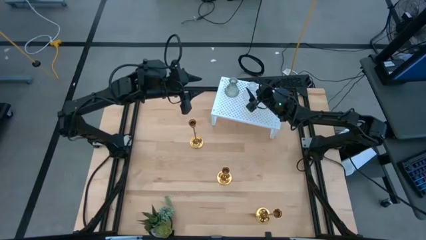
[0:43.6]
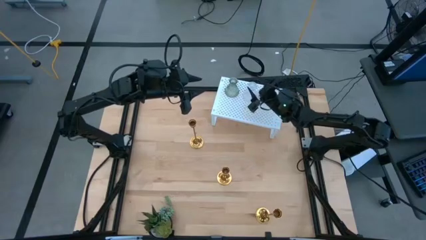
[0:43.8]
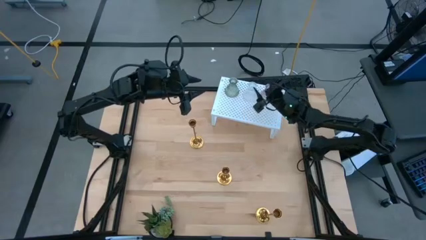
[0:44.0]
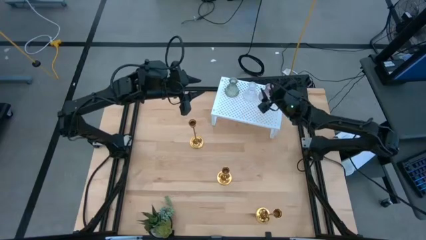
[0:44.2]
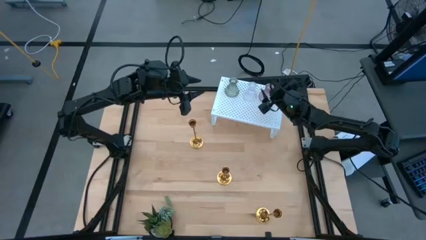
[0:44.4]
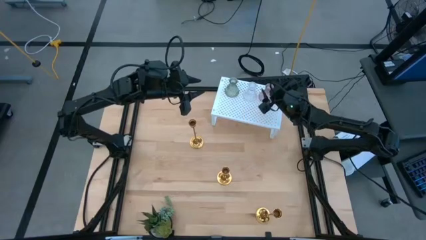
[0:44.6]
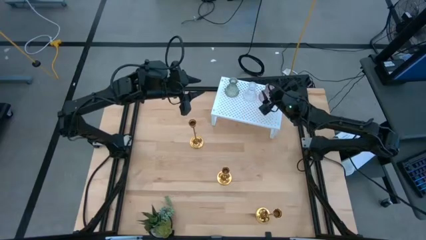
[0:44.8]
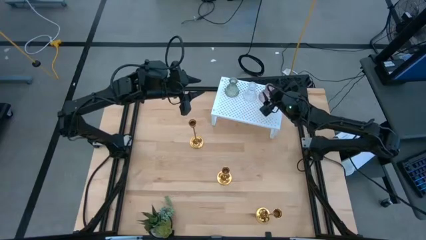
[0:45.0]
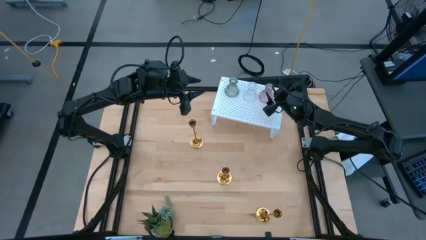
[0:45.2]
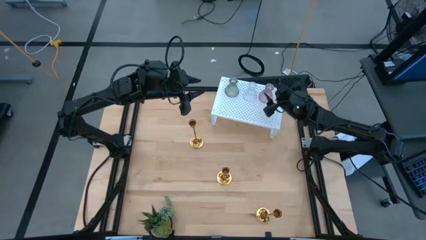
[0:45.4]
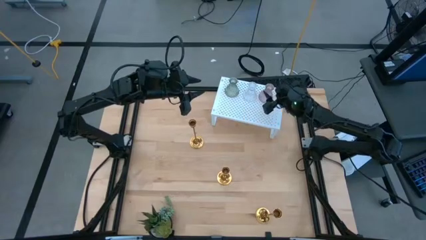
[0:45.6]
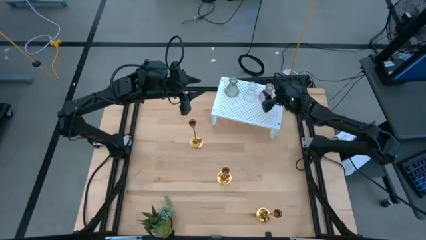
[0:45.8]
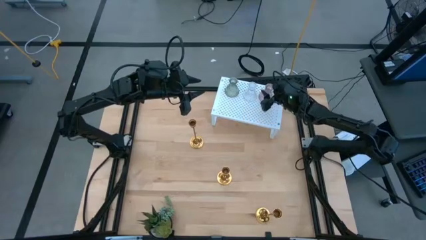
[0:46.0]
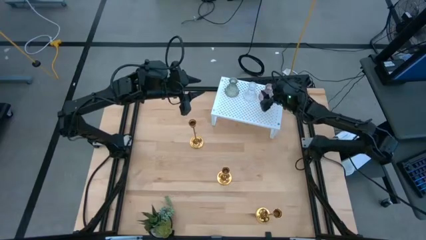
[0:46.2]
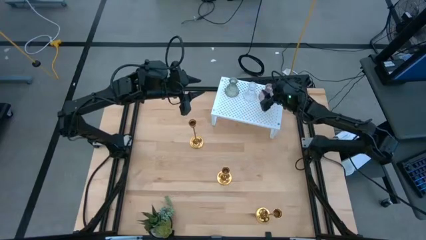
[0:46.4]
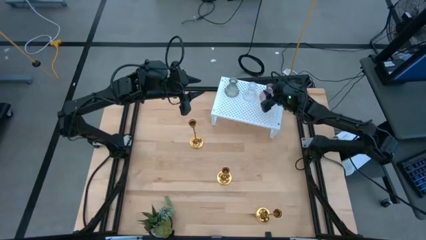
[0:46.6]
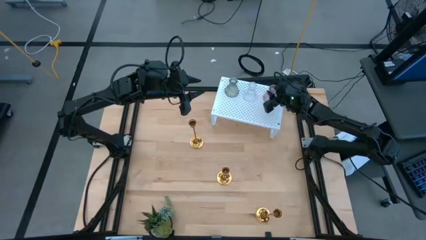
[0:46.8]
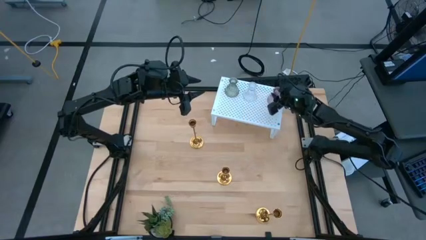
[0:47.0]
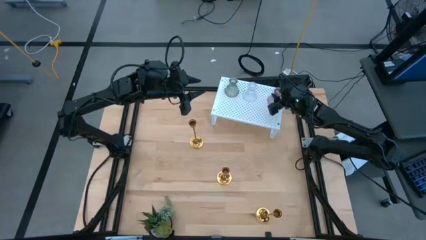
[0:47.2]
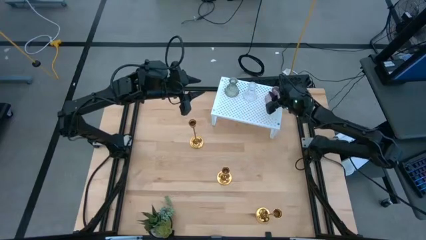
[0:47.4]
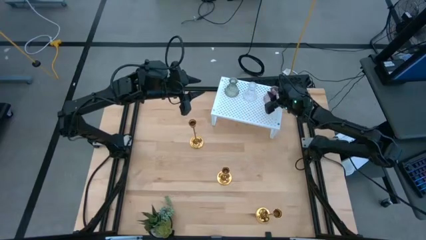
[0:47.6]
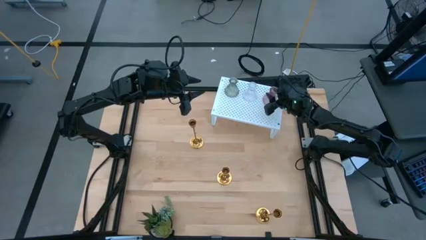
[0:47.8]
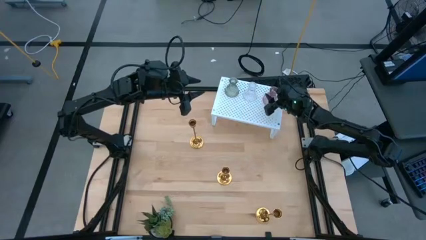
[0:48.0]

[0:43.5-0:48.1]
Task: Pick & Place candle stick holders
Adjust the pink glass candle holder on the shelf

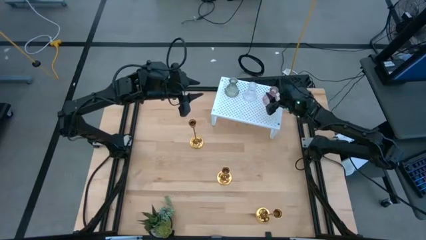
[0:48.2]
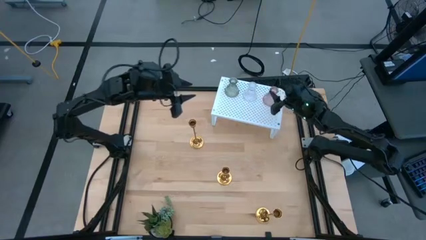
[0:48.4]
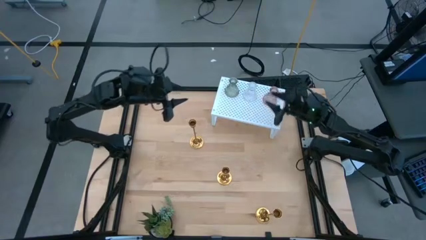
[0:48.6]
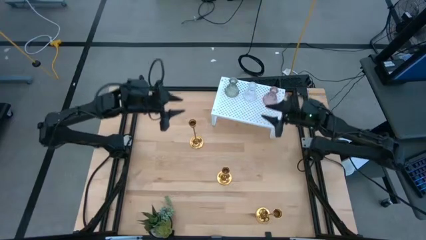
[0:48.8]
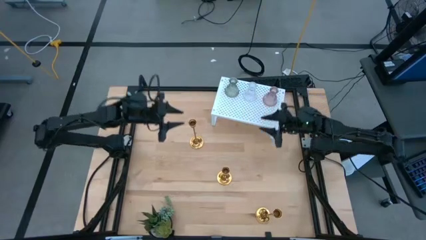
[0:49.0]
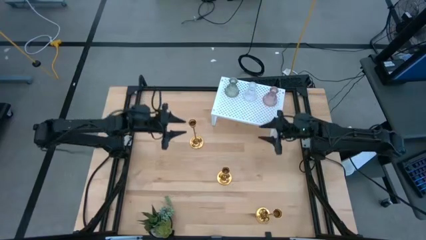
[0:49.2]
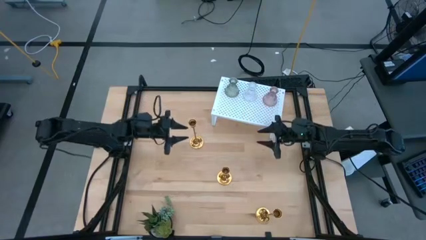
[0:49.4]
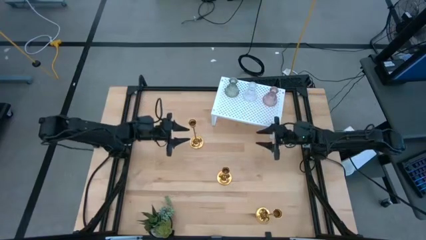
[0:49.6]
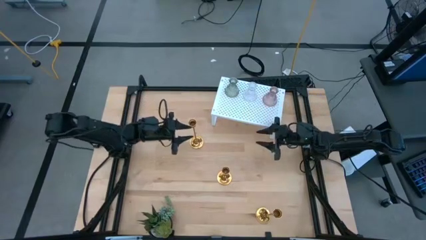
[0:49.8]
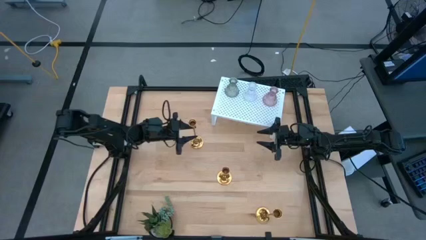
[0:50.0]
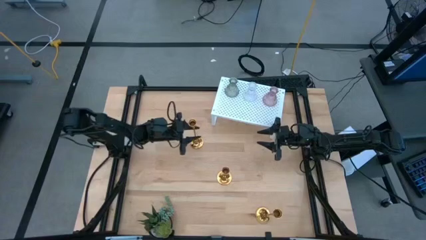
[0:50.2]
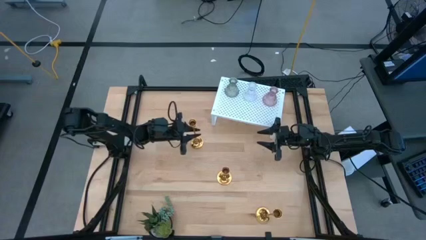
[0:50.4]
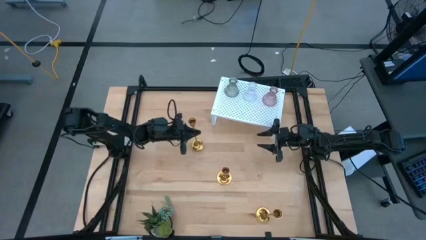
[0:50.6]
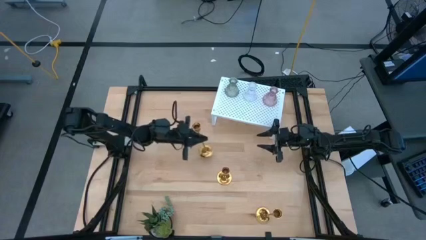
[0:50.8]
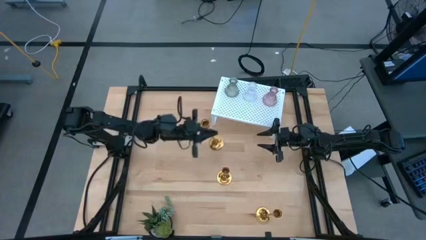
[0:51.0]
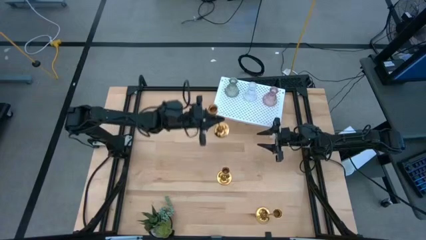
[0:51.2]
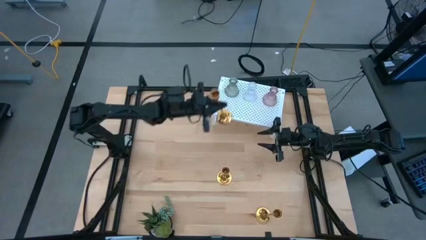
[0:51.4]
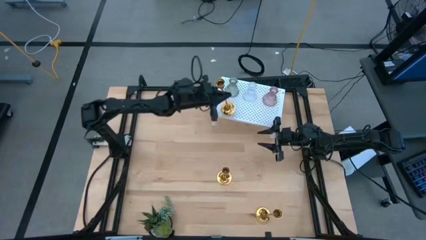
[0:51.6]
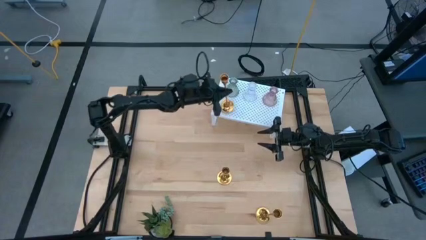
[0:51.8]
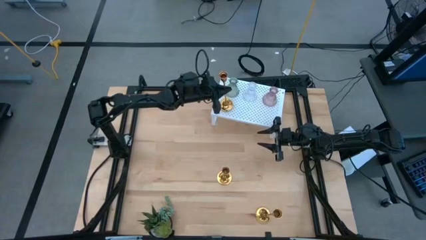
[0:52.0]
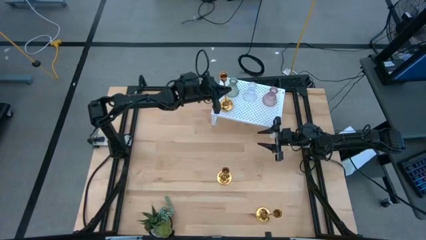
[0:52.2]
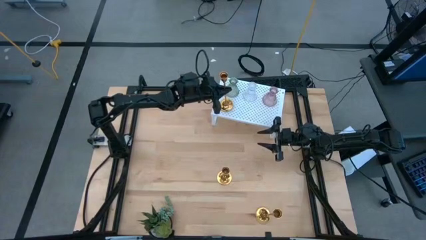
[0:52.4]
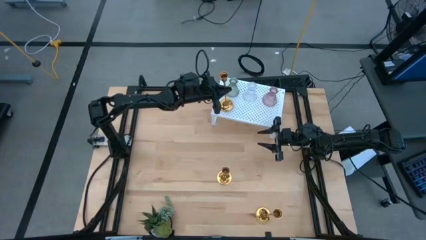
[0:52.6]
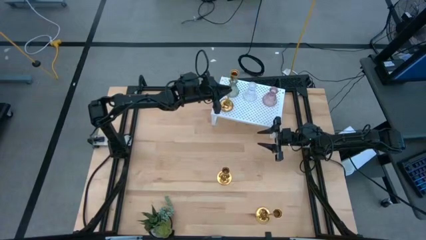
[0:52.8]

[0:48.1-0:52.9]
Put the gold candle holder on the shelf

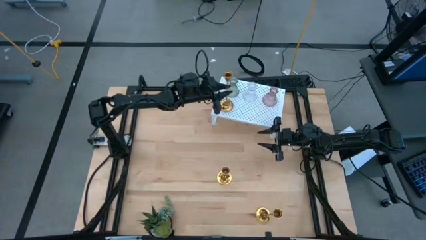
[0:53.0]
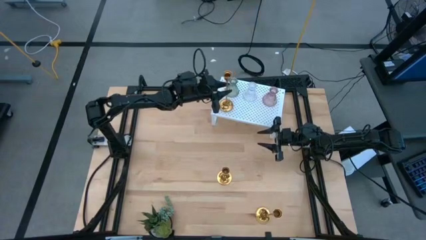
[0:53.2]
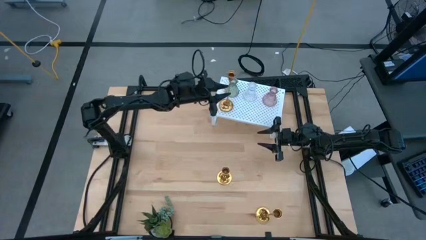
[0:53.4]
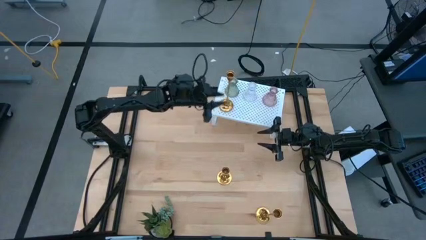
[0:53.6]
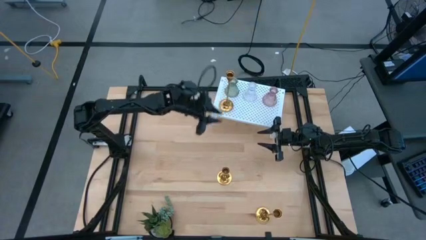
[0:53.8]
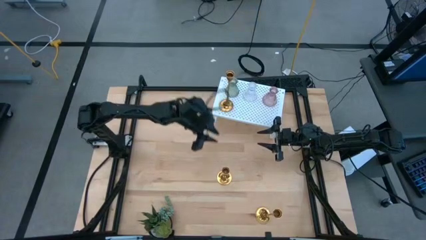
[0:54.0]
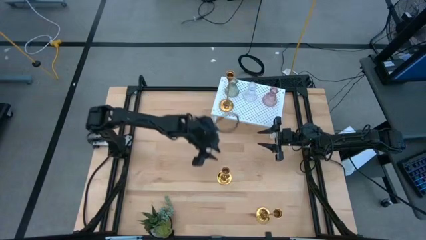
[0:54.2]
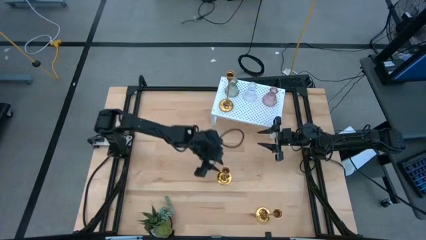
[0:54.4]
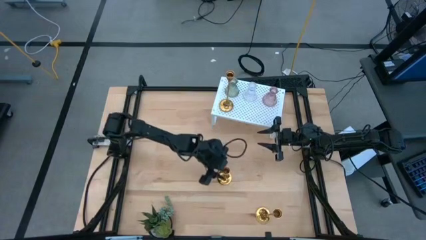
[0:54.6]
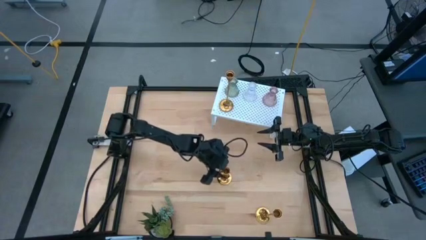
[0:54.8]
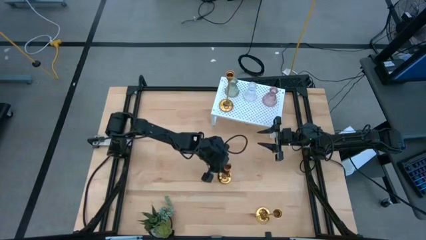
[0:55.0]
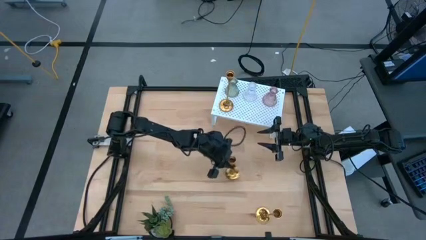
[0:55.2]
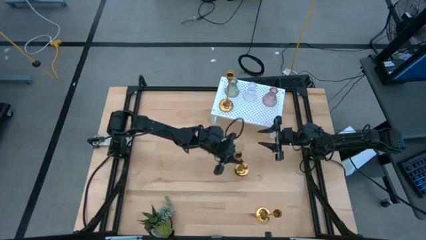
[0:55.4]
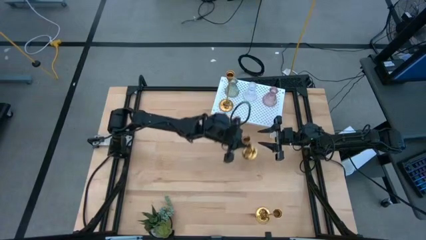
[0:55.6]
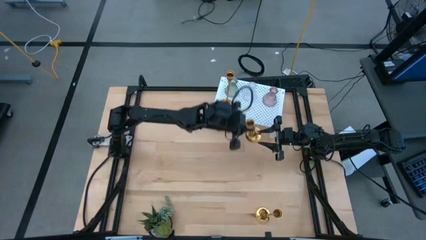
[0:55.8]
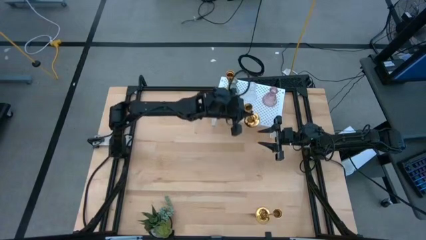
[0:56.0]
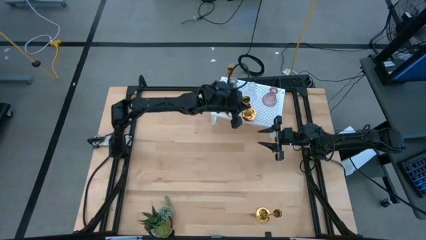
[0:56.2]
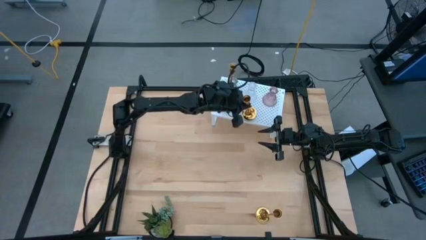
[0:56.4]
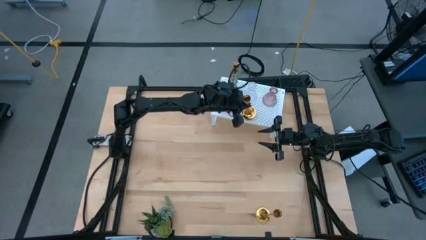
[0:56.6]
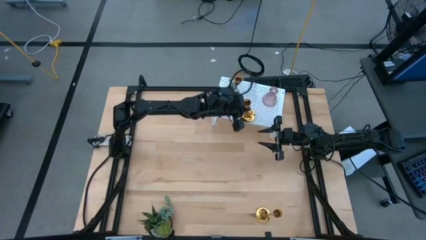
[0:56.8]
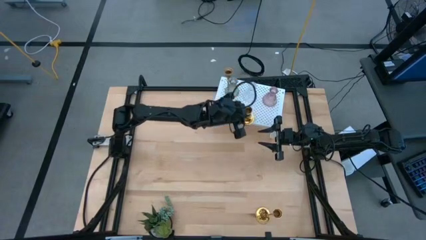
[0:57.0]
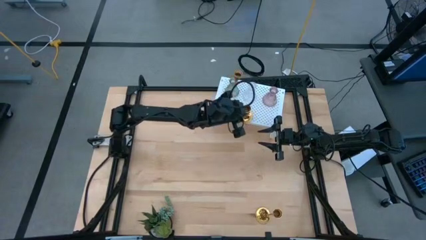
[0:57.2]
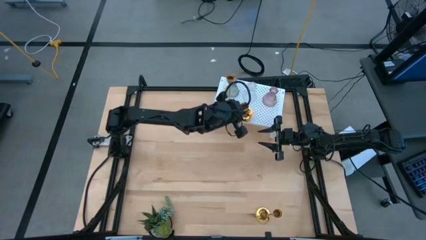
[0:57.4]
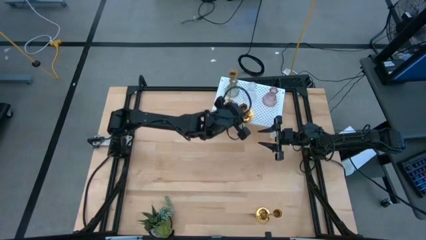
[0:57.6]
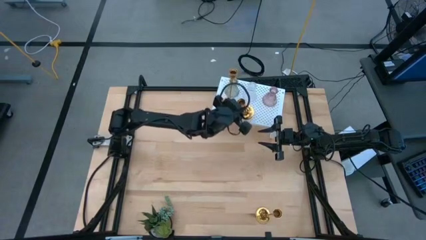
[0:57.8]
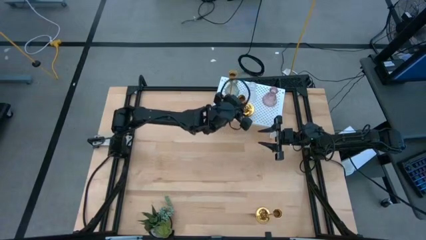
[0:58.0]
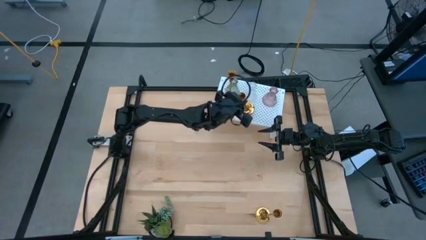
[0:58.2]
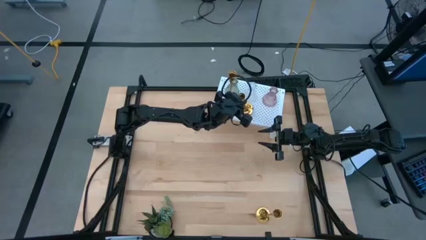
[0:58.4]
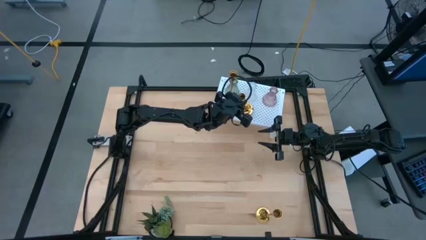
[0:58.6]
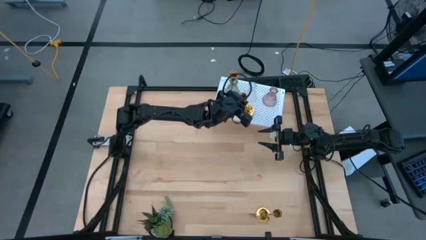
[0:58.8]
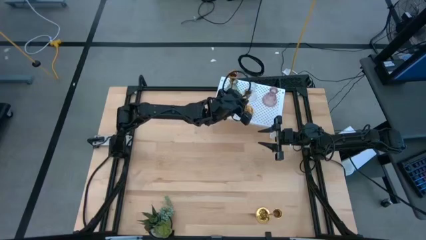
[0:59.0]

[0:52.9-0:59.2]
Align the top gold candle holder with the other gold candle holder on the shelf

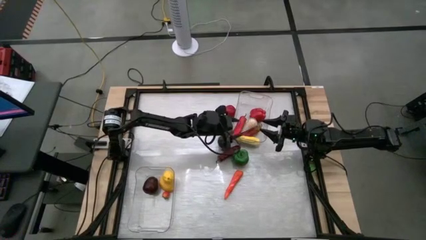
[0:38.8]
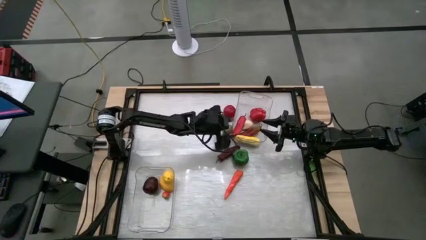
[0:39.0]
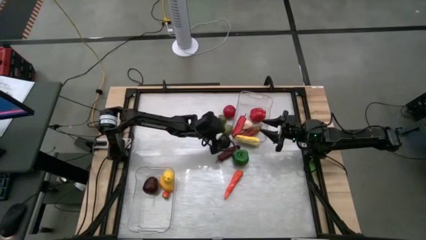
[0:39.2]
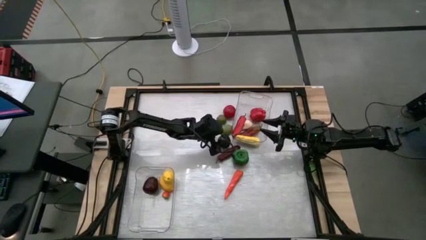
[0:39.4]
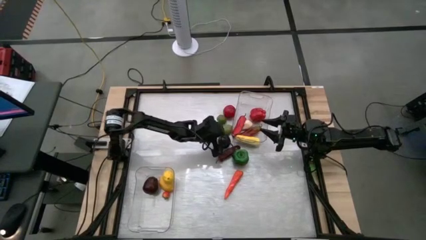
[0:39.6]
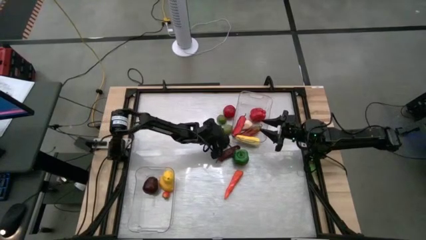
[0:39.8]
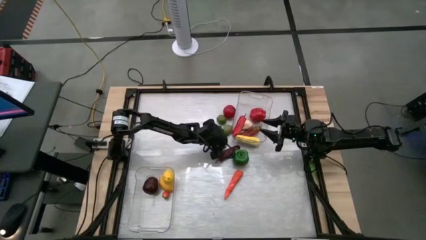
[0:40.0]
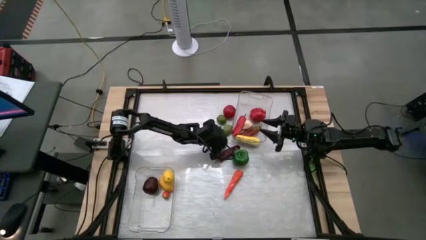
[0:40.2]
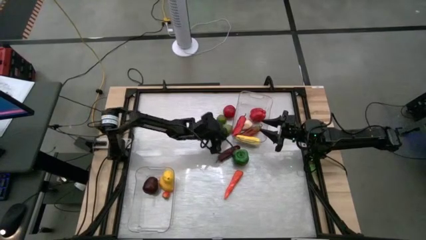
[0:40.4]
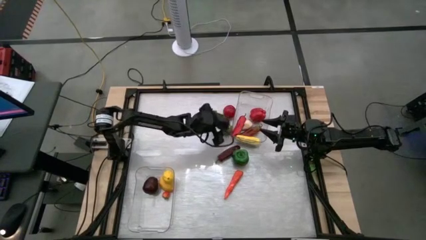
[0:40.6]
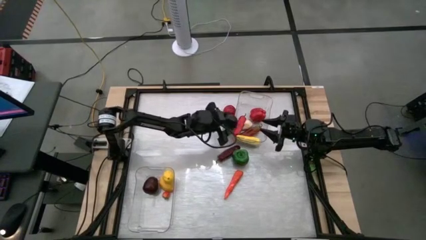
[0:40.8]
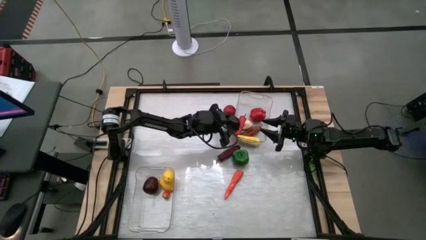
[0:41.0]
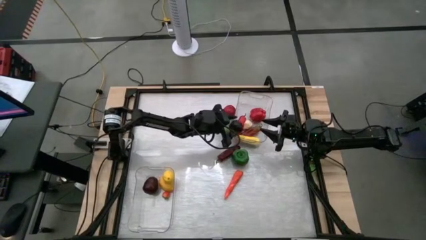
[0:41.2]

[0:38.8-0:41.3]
Task: Sort produce into baskets
Put the purple onion into the top transparent bin
